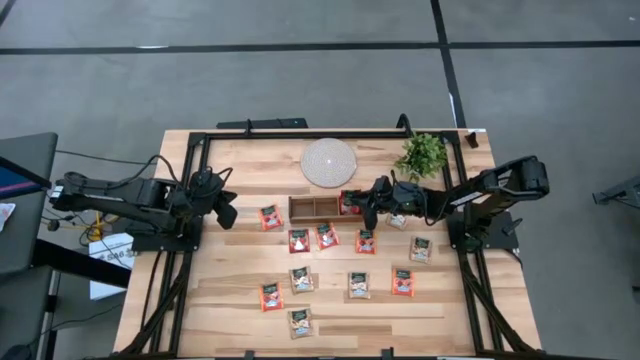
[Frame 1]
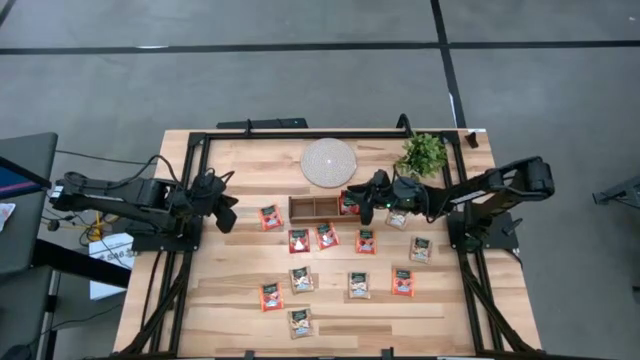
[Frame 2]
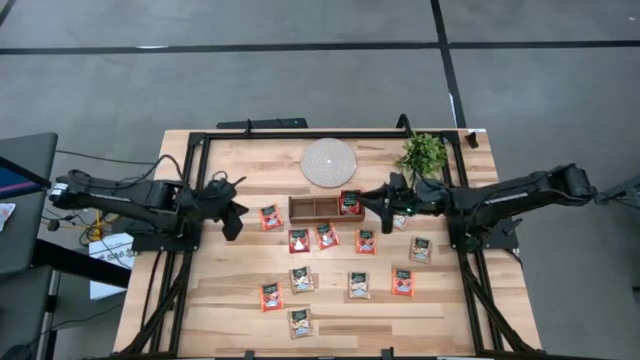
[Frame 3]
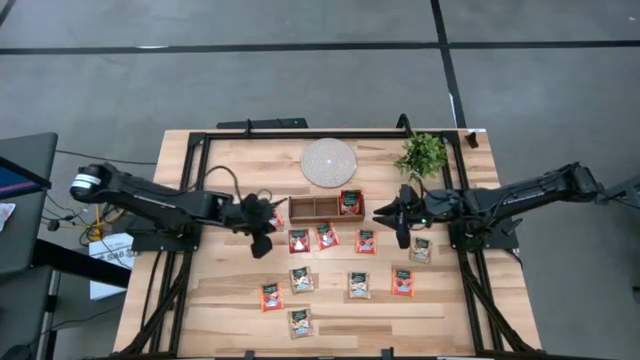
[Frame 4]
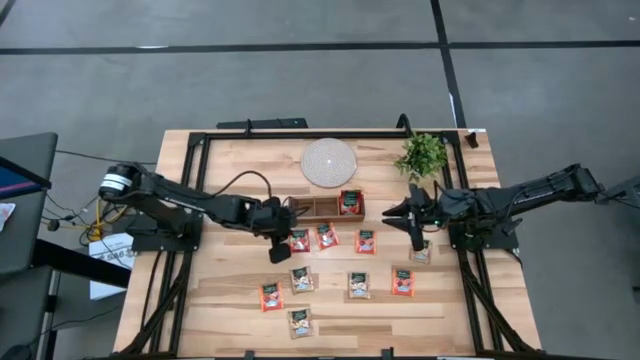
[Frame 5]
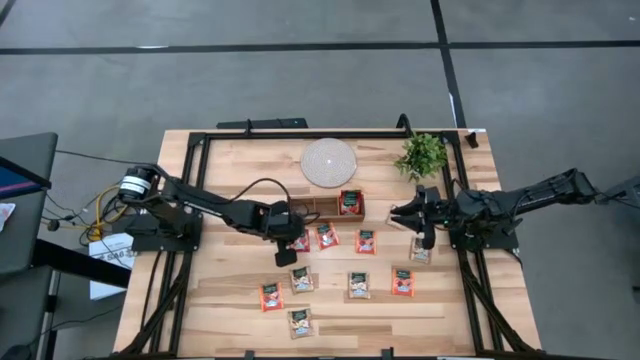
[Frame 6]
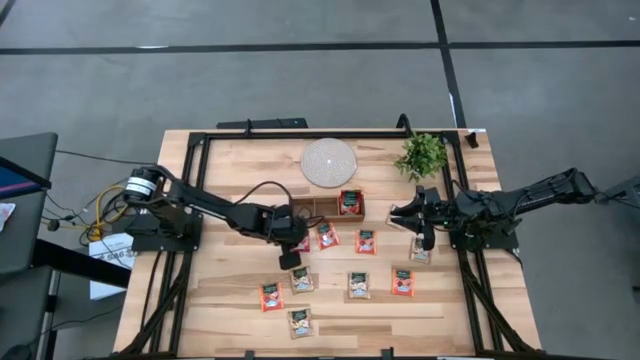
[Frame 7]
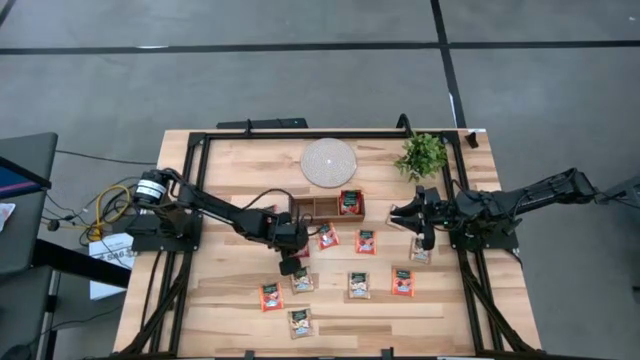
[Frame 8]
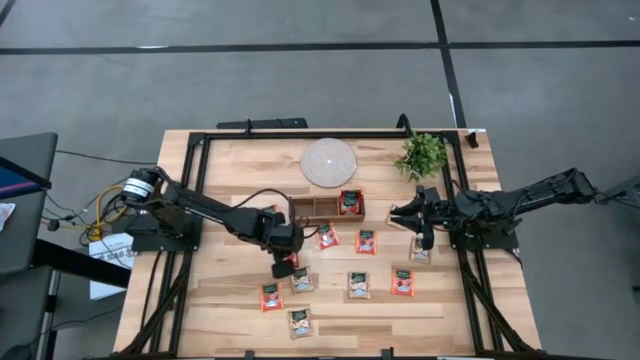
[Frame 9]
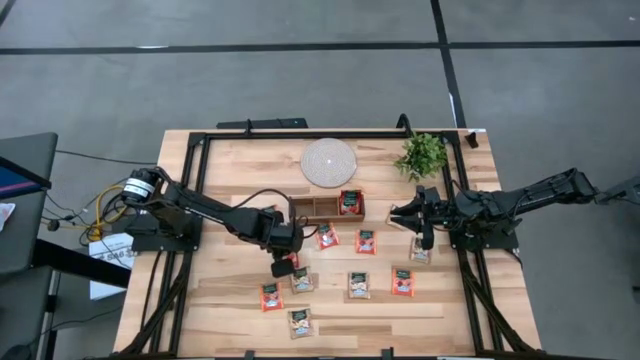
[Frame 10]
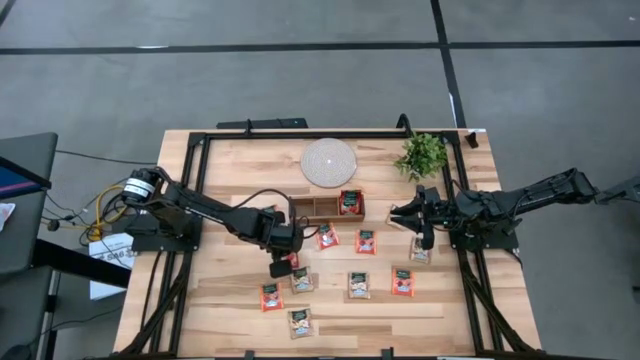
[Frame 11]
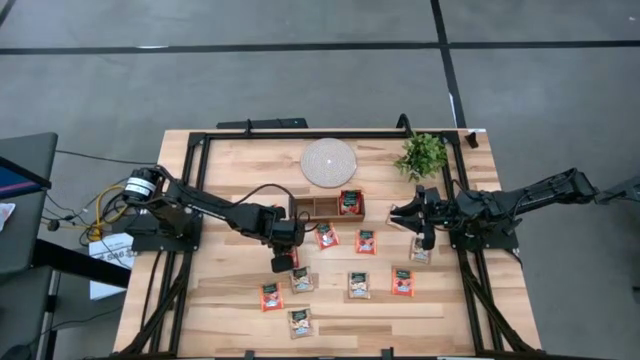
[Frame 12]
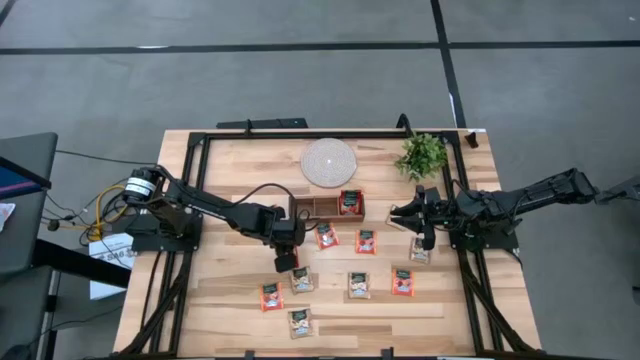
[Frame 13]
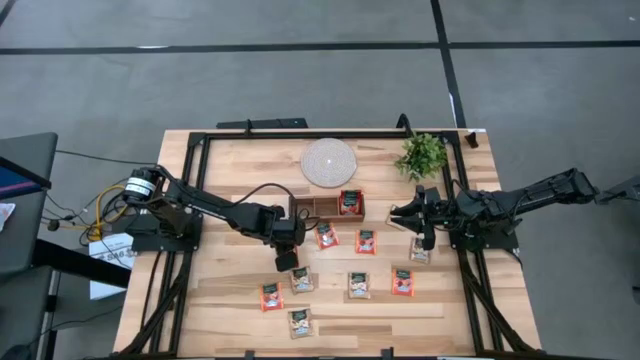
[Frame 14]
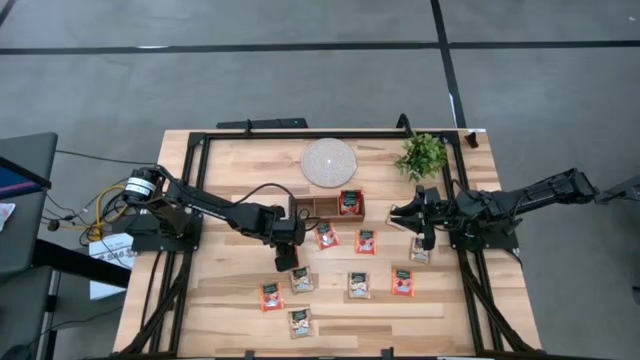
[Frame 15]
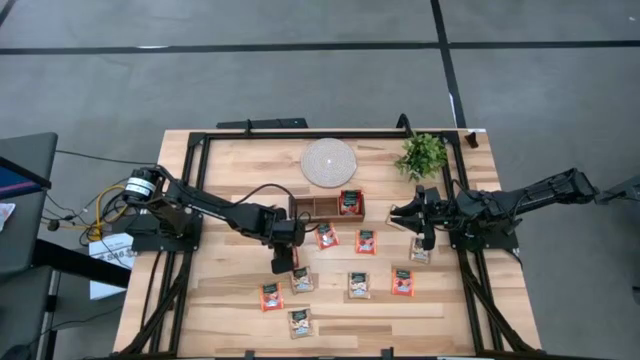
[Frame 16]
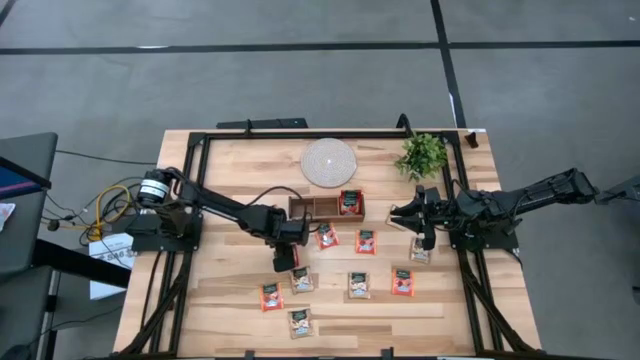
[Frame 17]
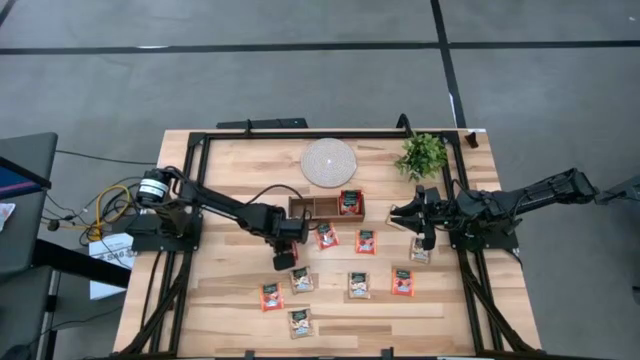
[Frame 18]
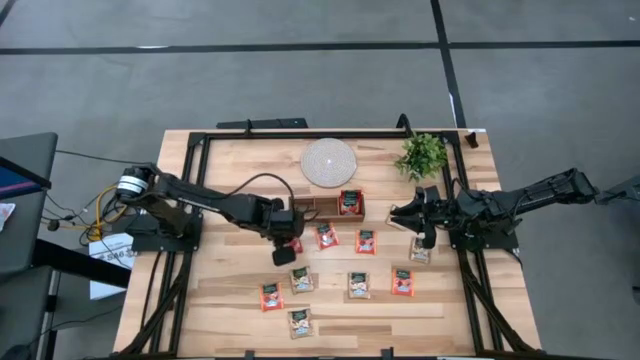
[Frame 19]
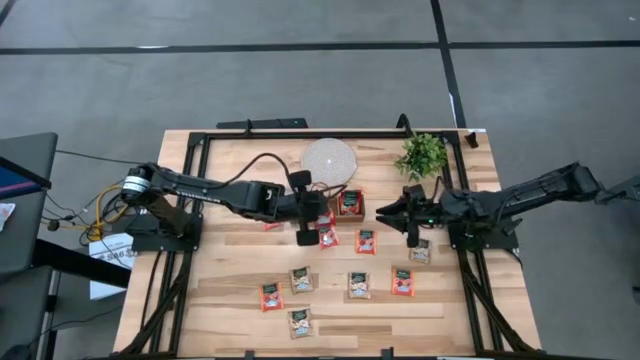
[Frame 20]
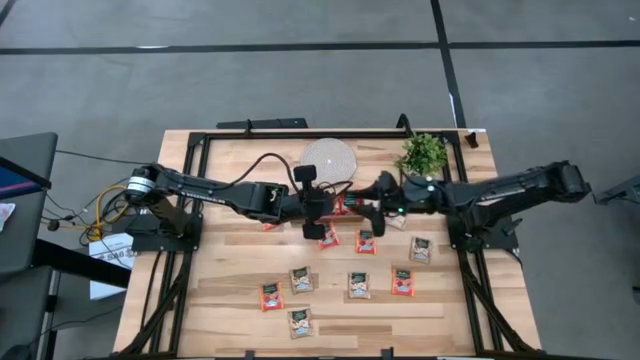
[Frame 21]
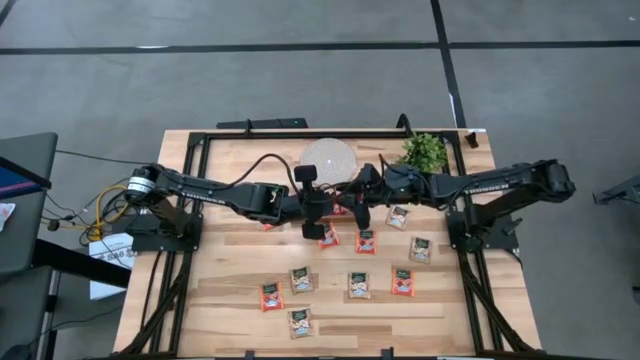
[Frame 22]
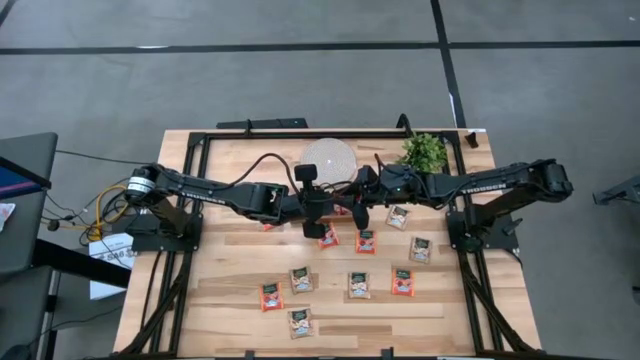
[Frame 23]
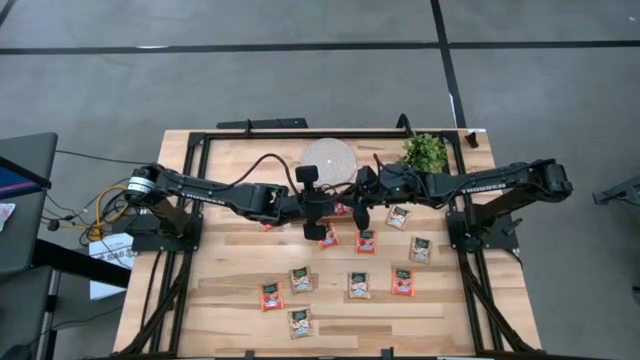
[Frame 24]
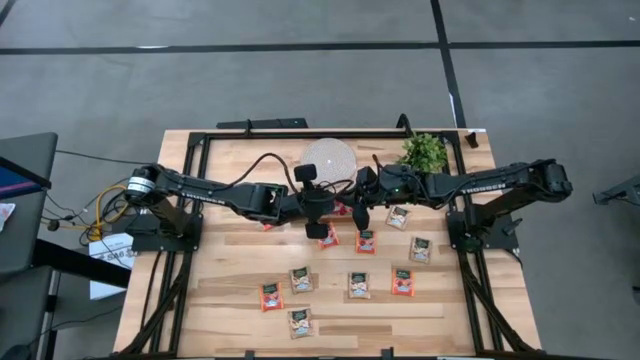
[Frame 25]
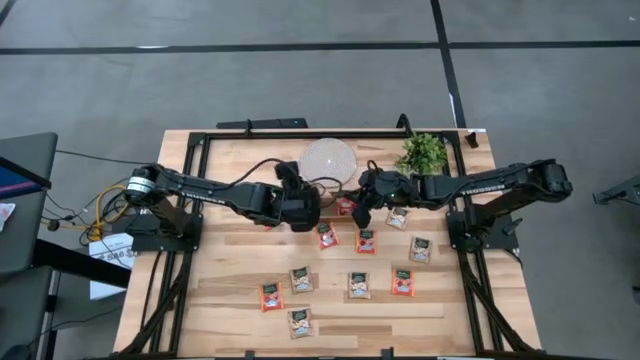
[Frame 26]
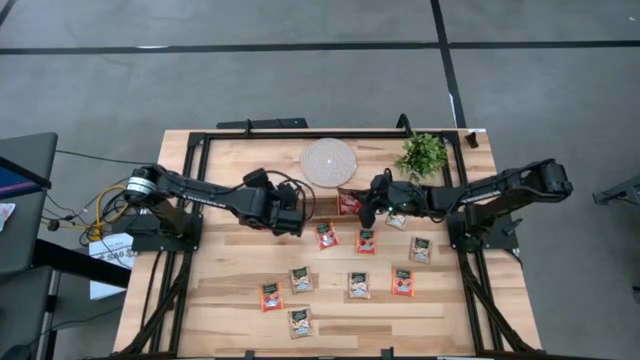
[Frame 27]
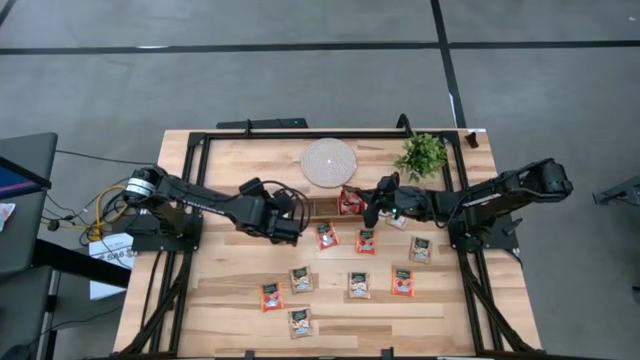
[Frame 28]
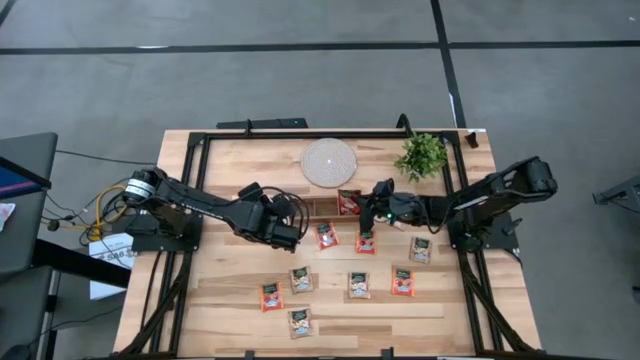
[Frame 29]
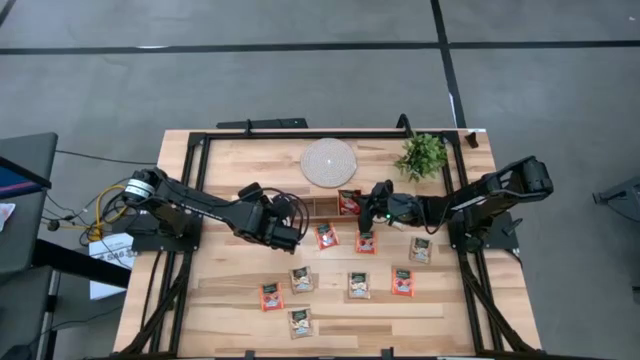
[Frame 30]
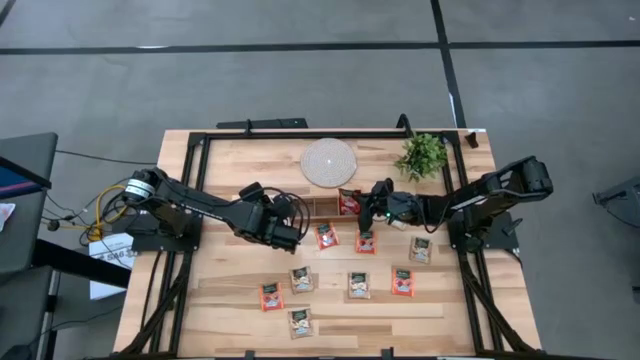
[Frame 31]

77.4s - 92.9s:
Task: Pick & Place Tea
Put the red tea bag into the right slot of the wooden organizer

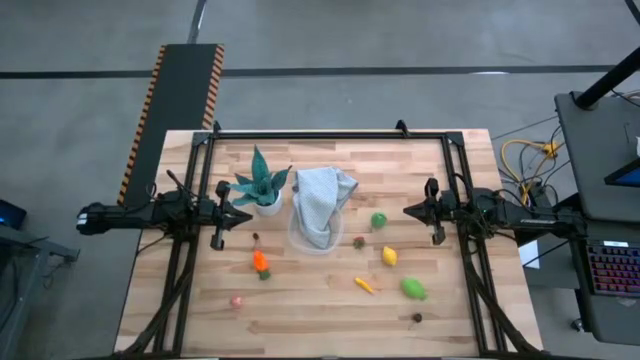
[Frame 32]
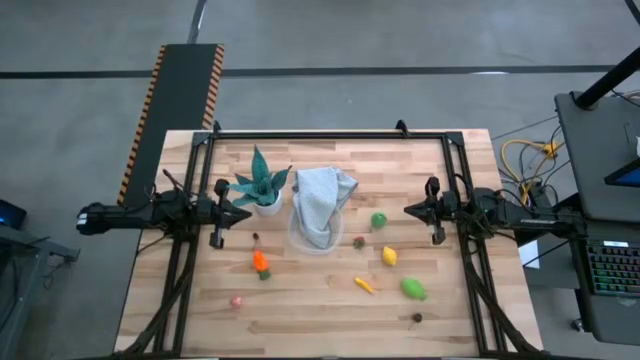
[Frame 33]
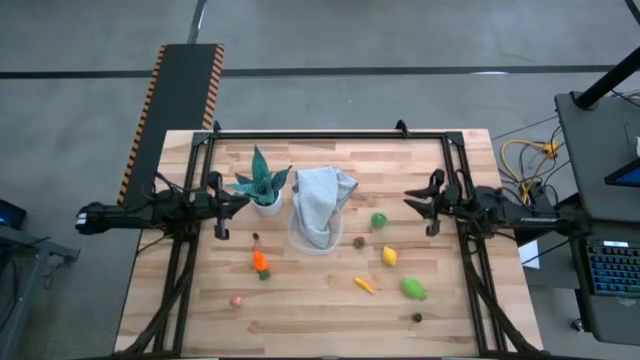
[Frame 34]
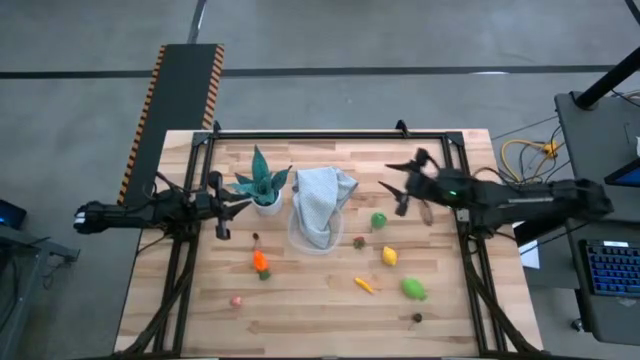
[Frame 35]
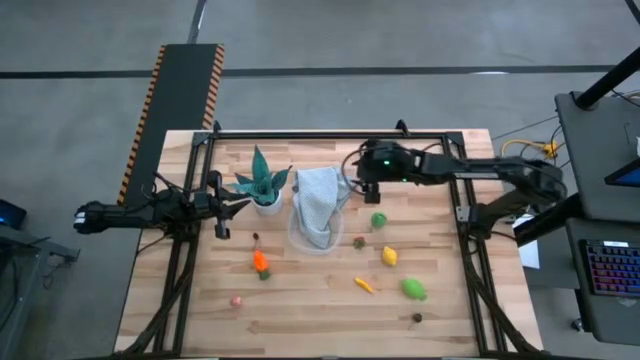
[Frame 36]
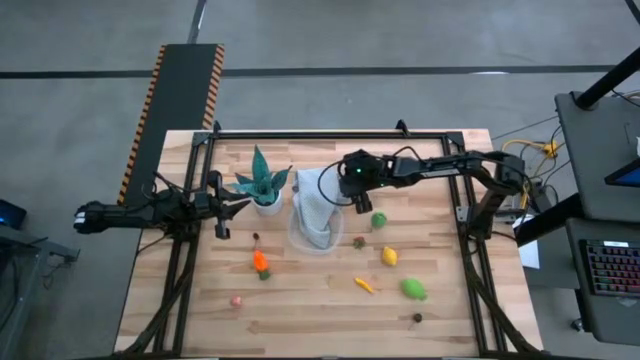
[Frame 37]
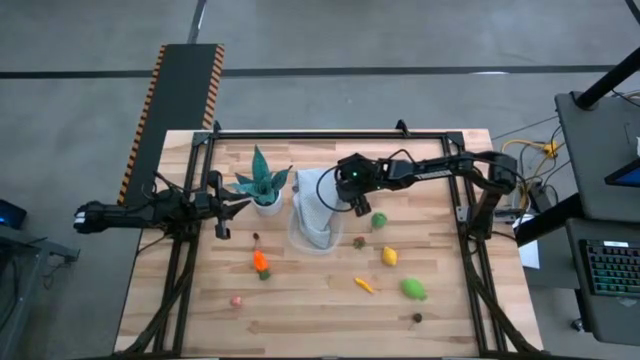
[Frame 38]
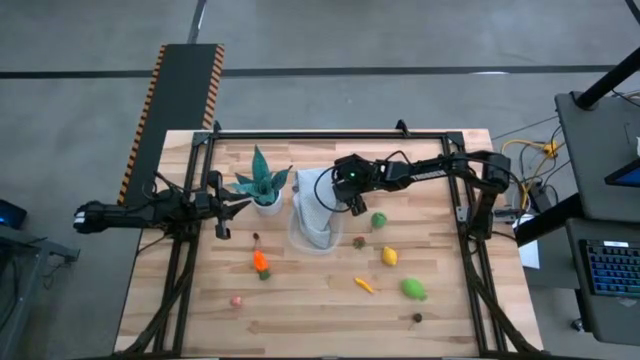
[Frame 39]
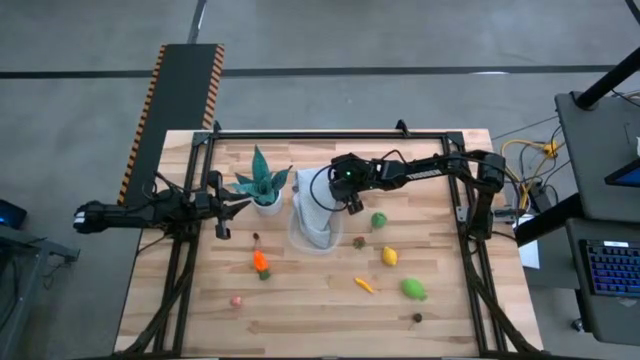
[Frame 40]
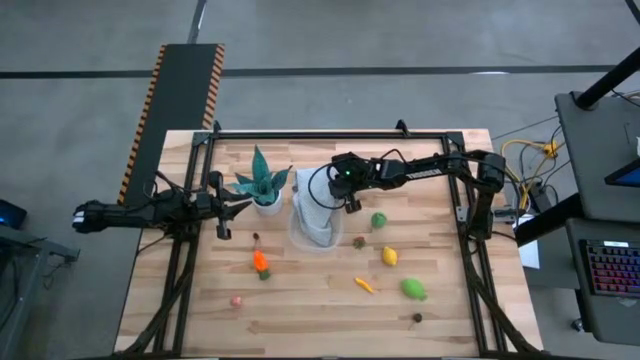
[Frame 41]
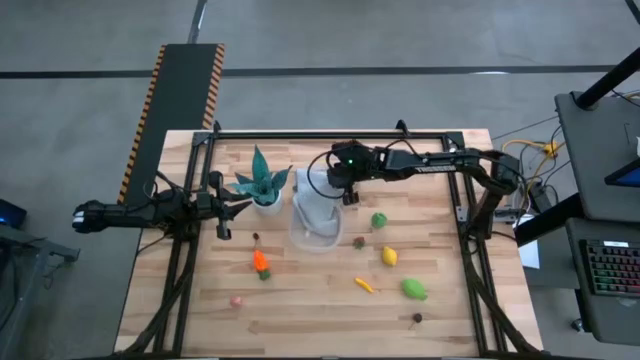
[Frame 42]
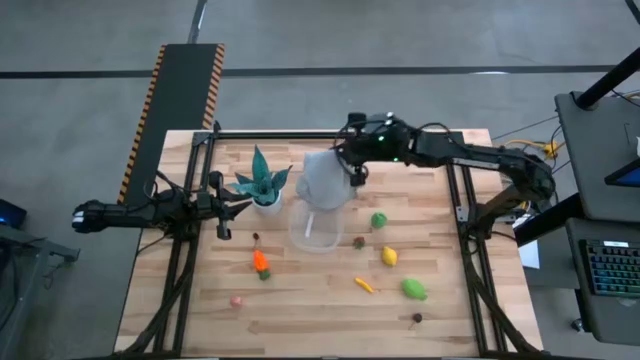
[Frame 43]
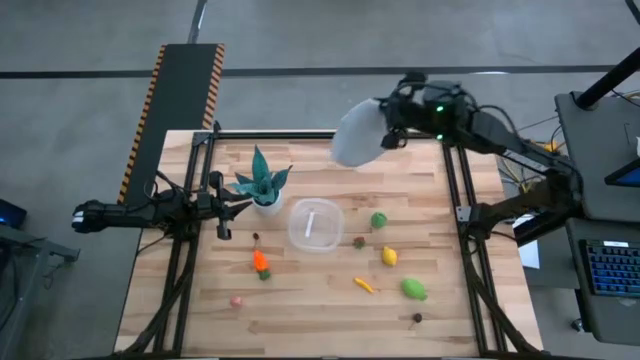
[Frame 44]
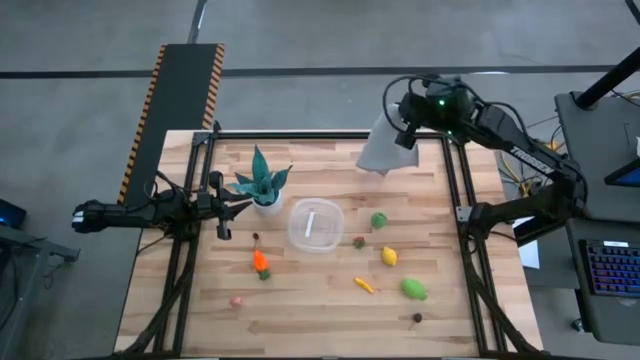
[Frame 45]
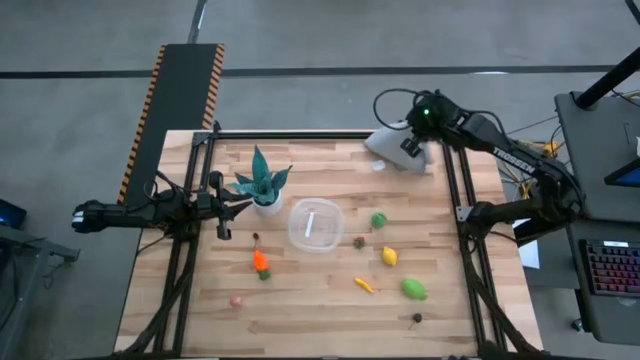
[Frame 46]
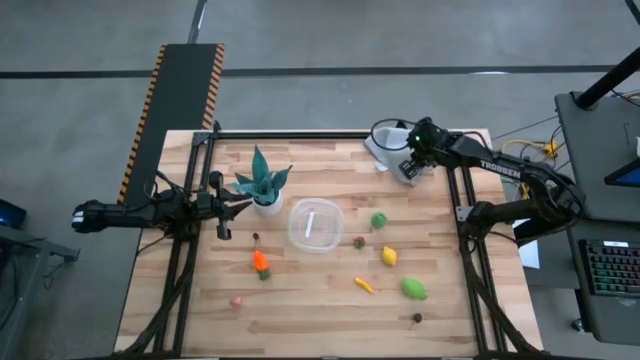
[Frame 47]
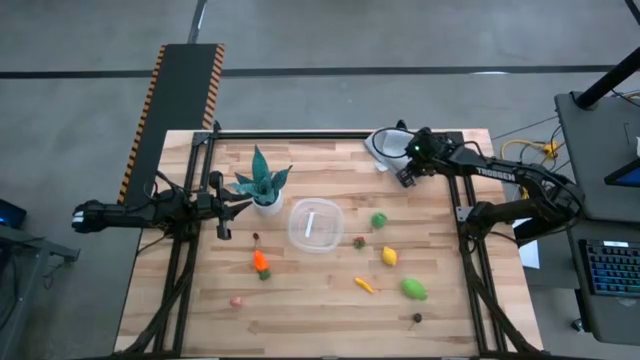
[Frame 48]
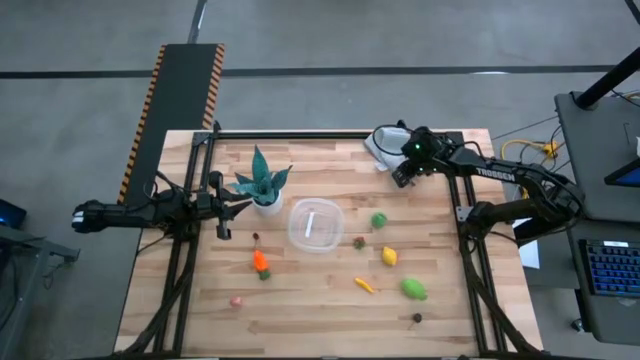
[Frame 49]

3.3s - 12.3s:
Task: Pick and placing Produce into tupperware
Move the gray cloth to the top right of the table
